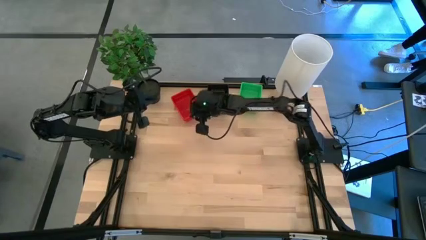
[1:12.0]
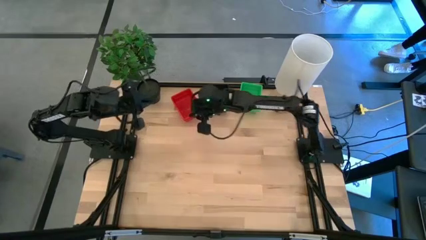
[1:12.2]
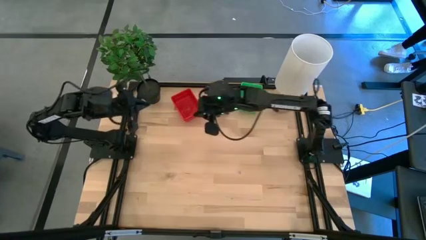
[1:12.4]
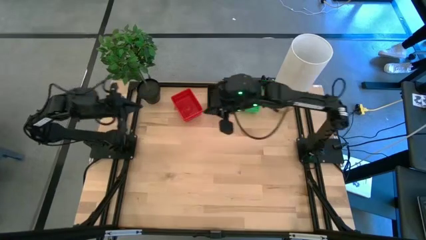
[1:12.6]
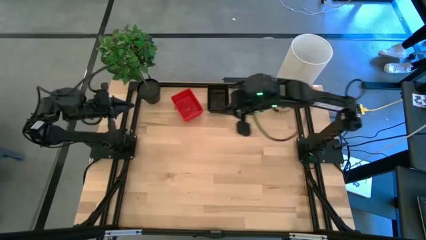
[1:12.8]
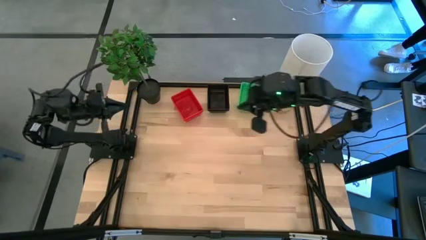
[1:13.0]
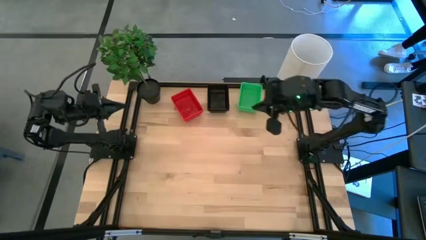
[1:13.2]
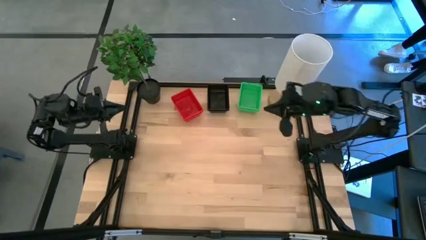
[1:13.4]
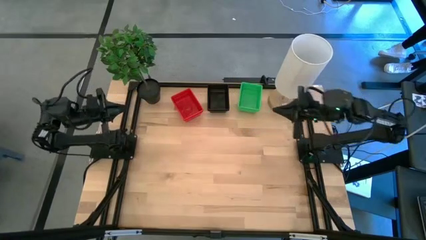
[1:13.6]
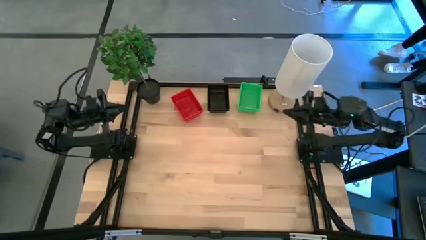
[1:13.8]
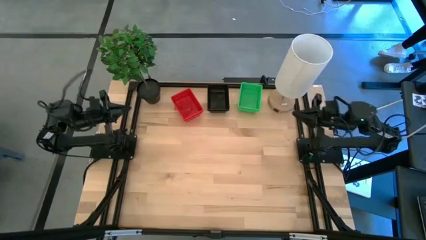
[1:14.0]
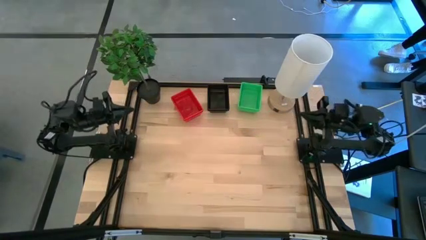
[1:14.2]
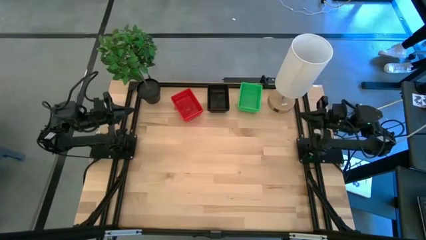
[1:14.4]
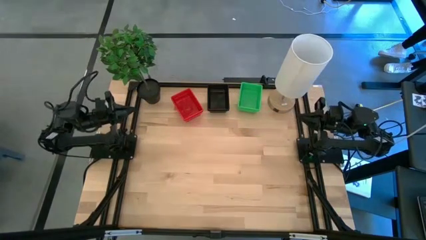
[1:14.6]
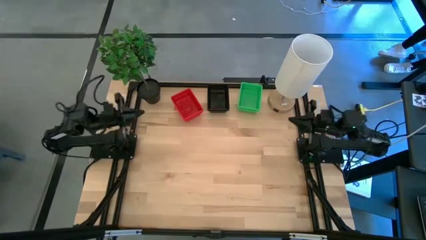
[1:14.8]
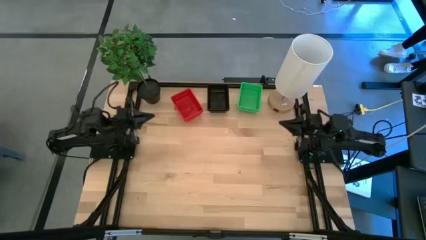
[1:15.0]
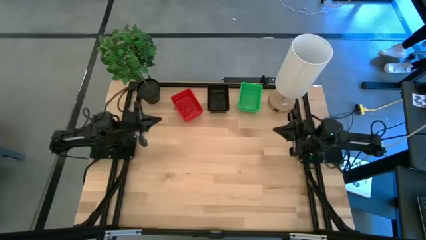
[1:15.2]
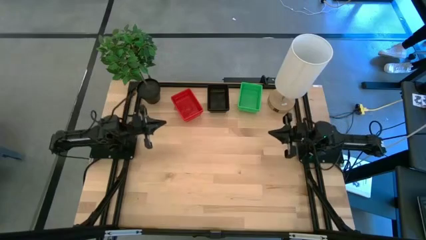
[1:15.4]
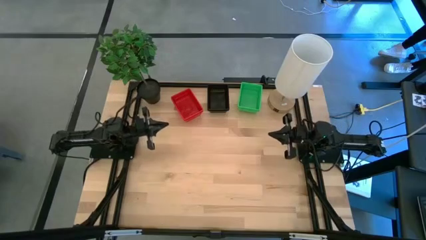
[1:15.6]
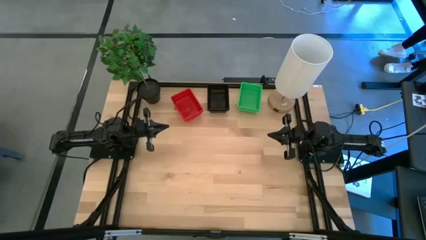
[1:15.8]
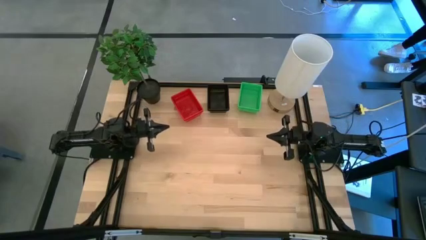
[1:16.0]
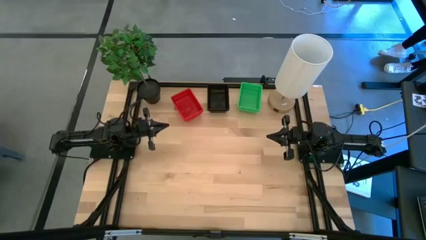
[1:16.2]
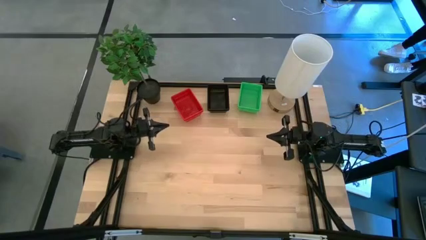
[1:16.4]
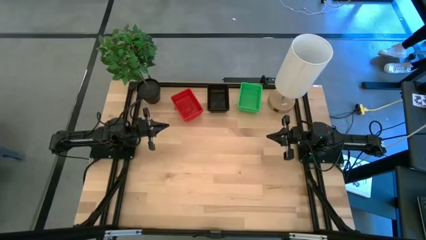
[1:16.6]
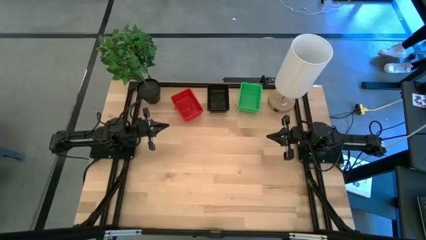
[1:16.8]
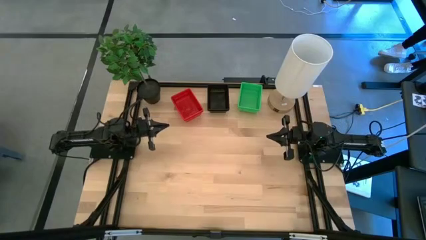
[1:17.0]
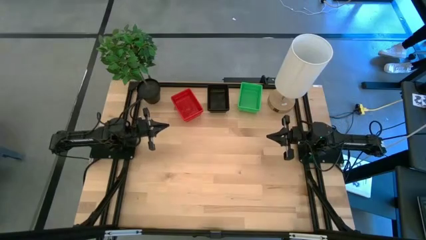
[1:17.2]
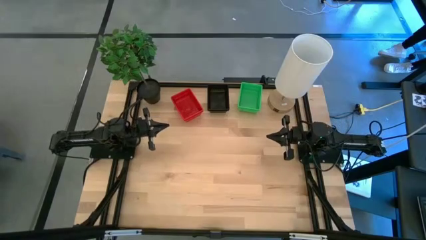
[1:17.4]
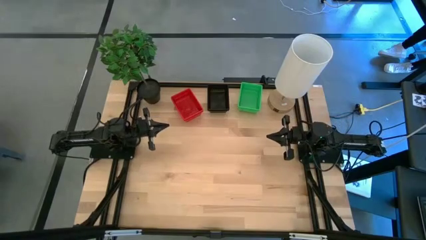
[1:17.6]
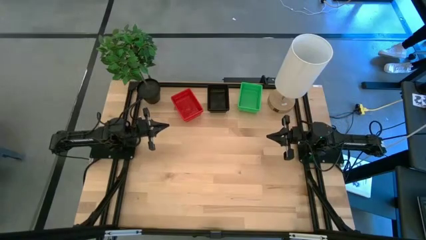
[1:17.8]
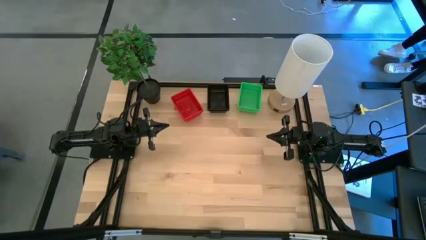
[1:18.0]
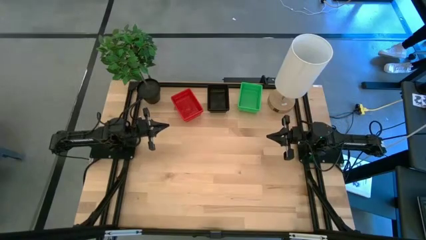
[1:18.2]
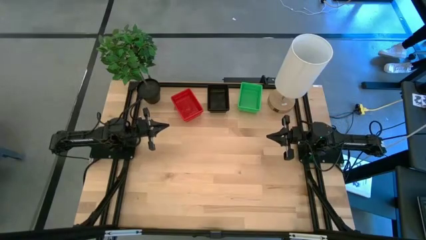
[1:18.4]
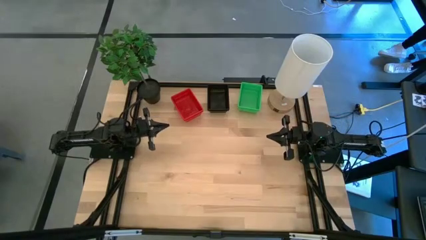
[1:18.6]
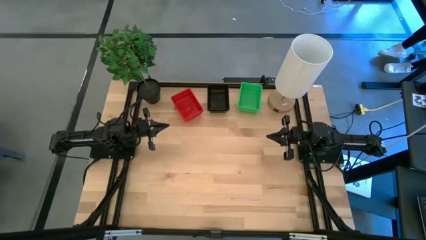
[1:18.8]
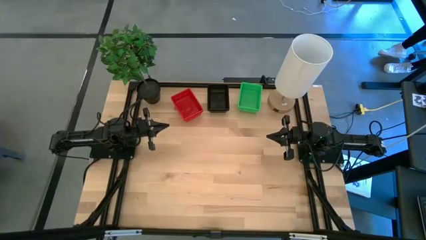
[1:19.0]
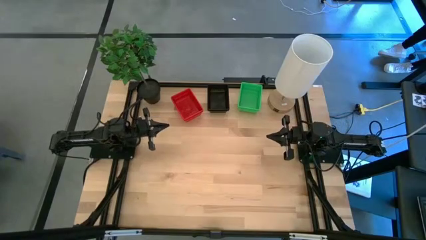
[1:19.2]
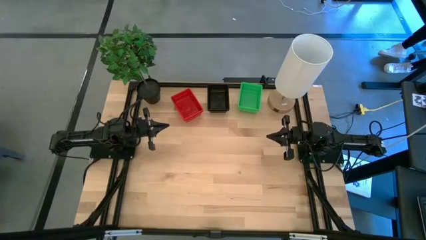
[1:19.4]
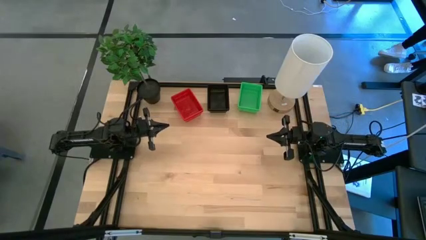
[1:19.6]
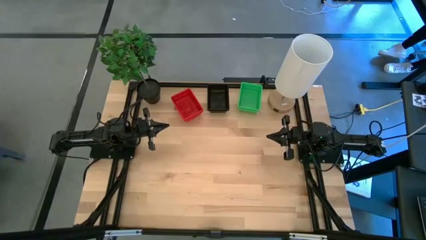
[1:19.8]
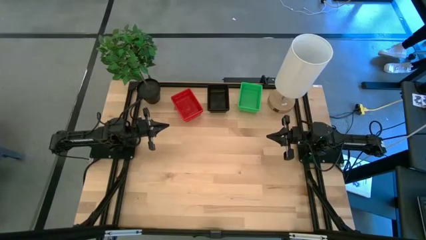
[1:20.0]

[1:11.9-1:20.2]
Return to Home Position
